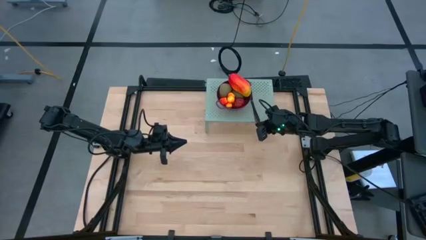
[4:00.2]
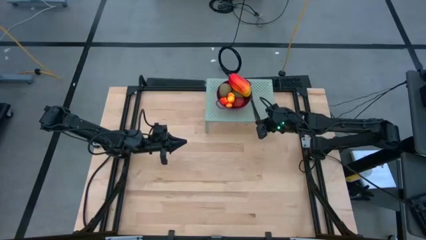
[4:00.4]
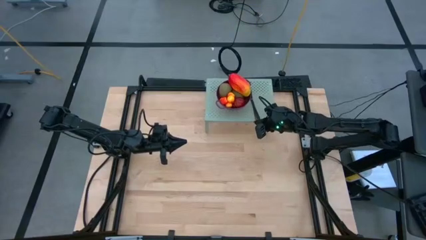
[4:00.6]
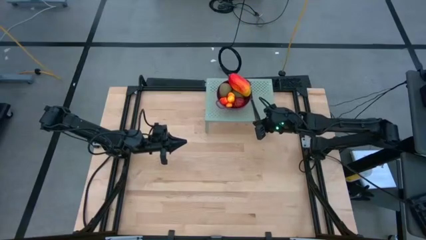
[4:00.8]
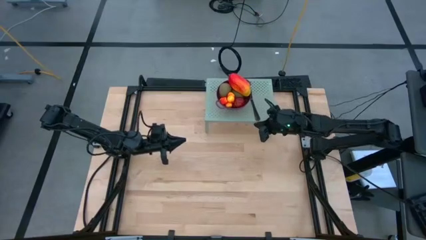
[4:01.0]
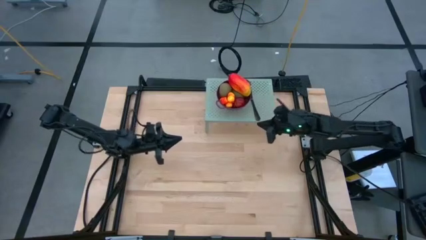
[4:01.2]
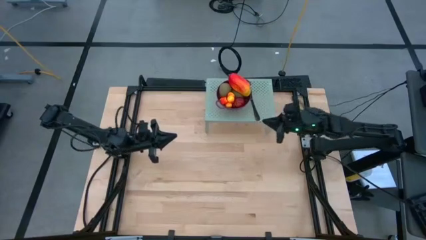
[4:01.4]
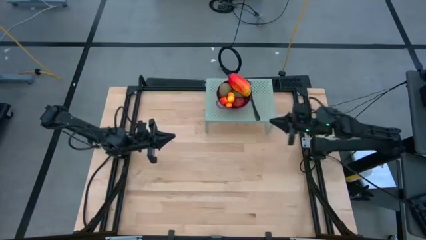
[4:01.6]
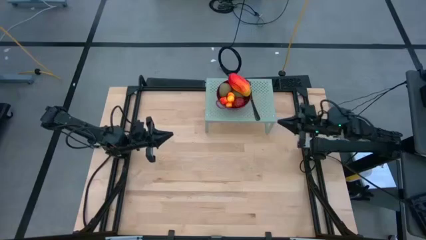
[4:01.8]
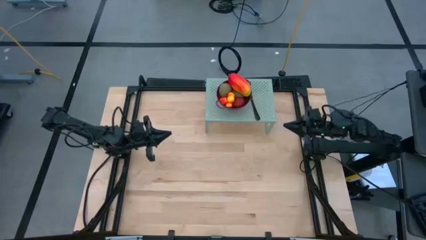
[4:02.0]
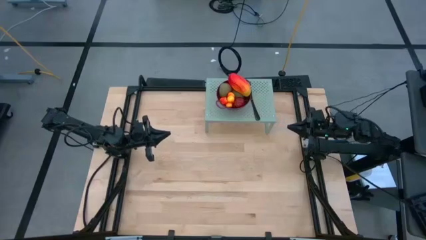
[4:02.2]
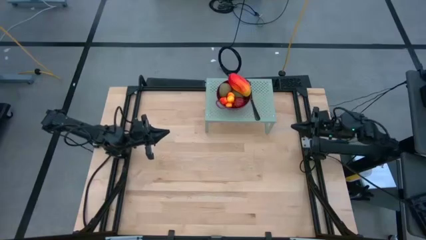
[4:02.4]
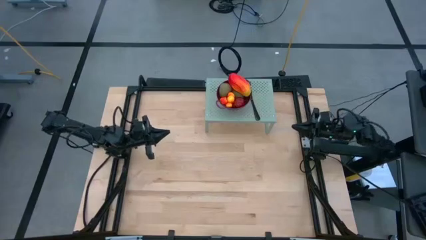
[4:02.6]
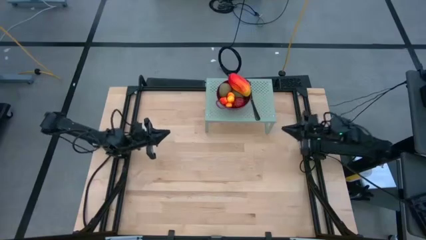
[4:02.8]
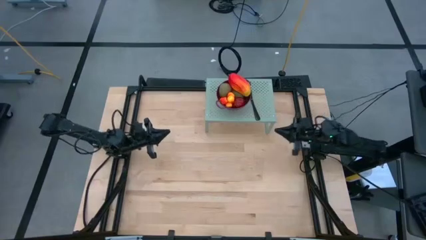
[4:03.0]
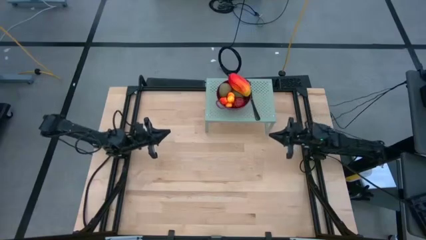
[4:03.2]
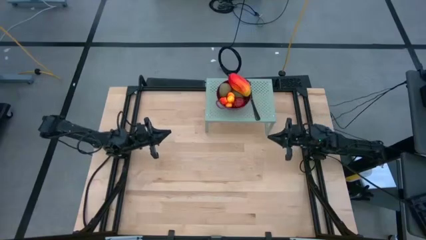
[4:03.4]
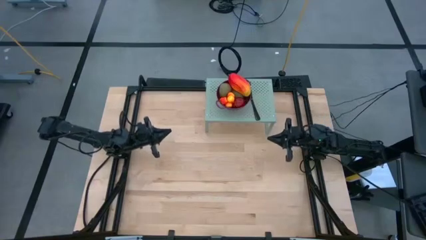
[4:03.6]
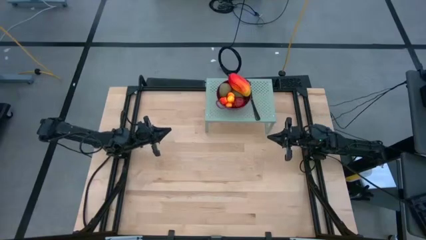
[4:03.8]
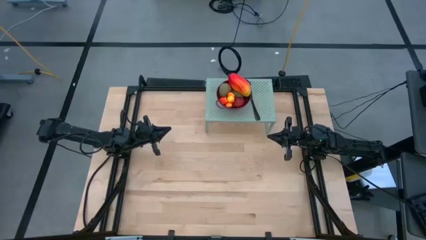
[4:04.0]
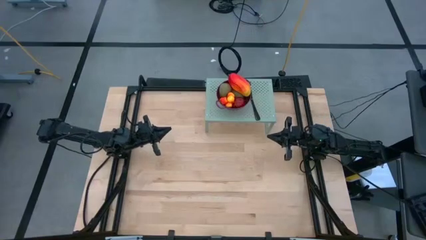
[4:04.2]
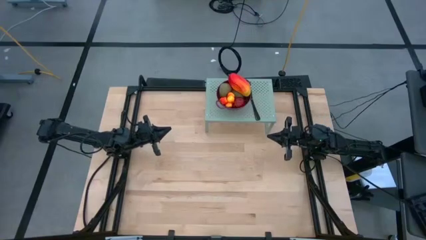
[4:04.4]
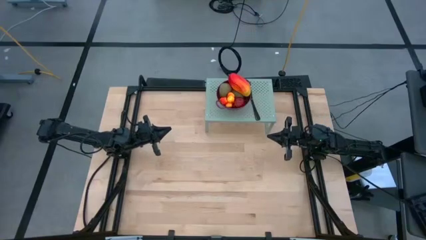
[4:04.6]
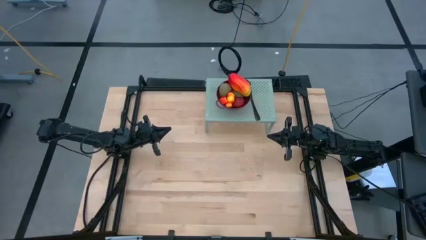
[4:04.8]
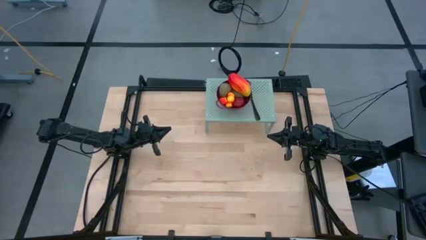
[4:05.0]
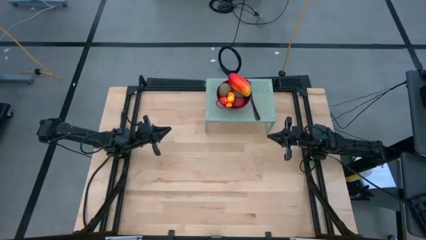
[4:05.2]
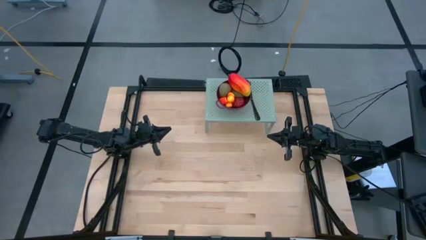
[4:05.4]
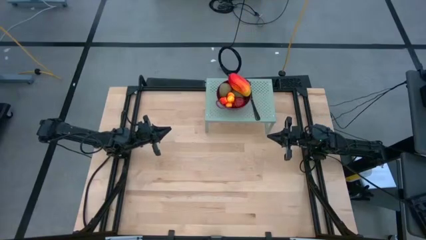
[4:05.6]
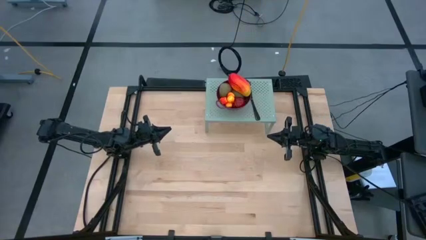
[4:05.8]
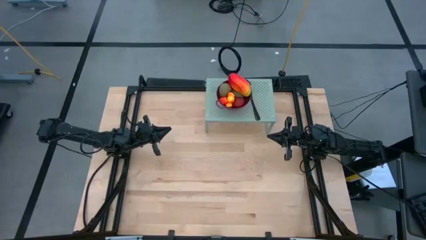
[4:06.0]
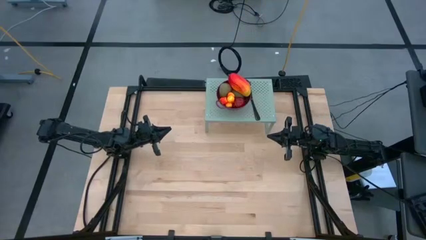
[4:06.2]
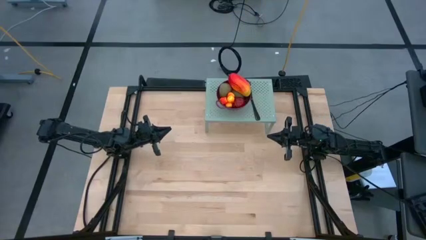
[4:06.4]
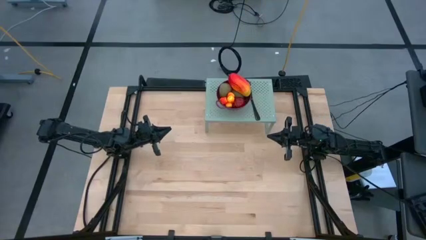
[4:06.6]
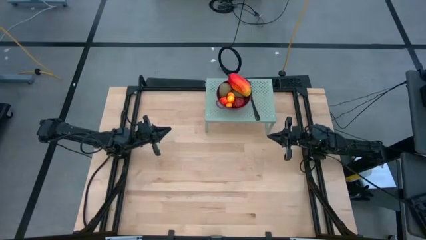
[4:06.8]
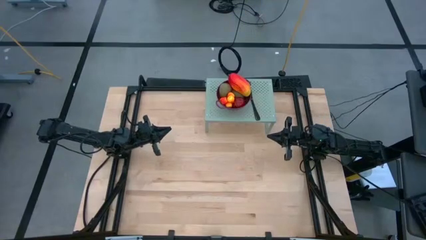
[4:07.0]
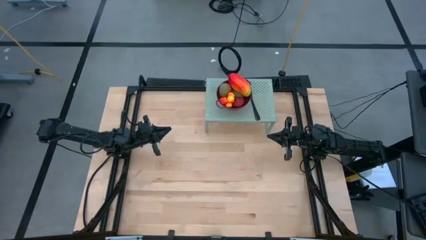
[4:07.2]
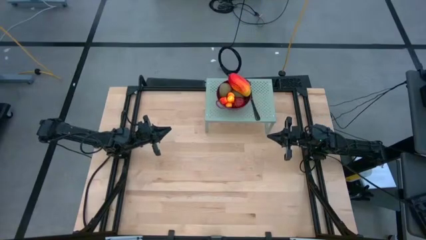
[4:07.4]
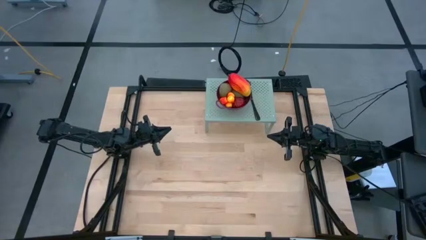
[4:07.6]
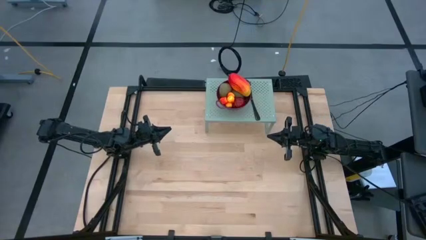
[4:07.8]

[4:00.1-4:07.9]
Task: Pick & Place Fruit
Return to Home Position

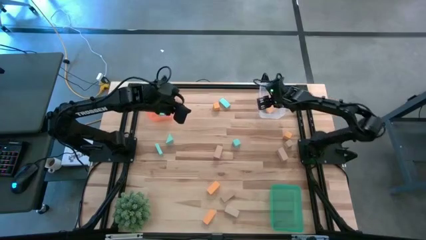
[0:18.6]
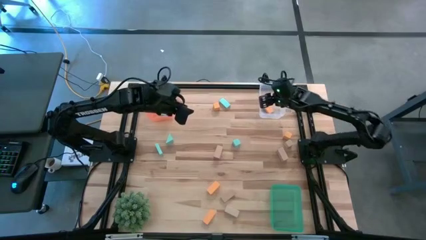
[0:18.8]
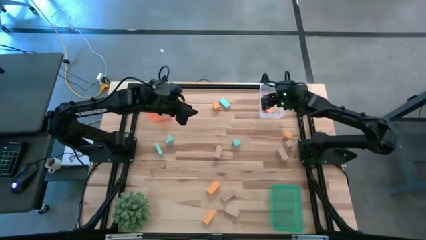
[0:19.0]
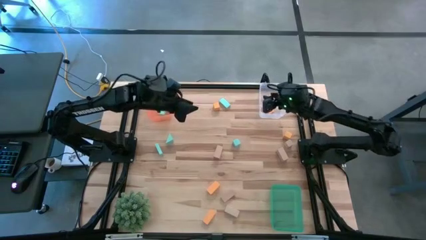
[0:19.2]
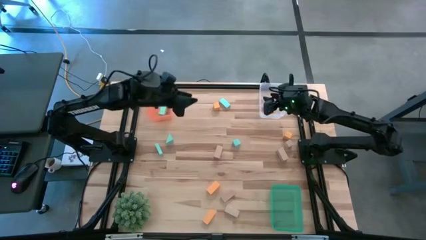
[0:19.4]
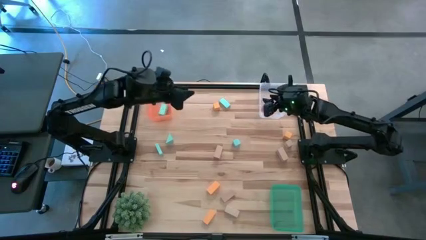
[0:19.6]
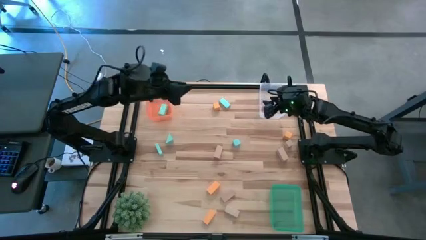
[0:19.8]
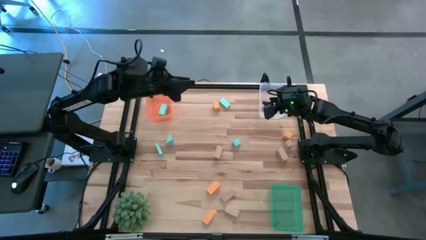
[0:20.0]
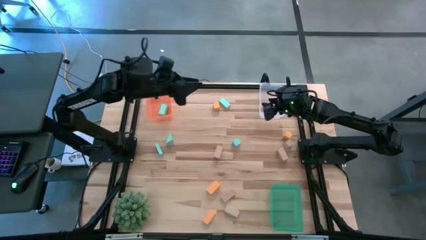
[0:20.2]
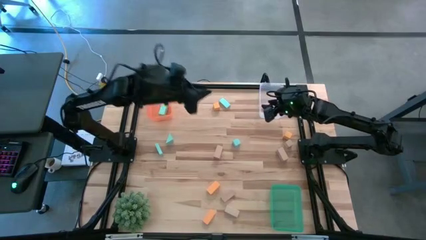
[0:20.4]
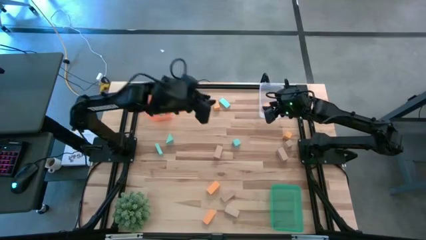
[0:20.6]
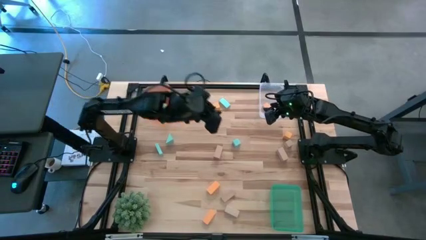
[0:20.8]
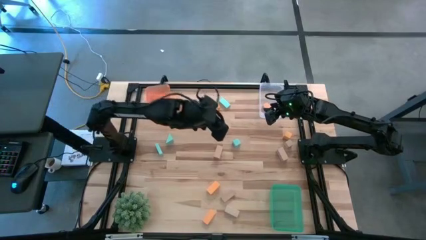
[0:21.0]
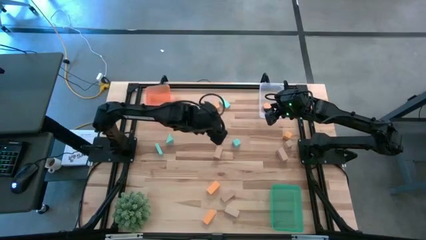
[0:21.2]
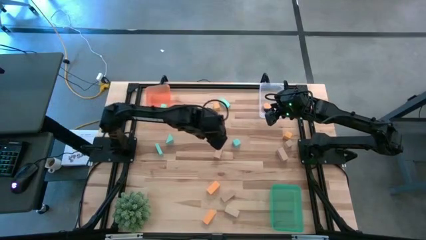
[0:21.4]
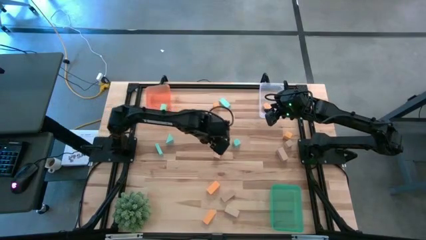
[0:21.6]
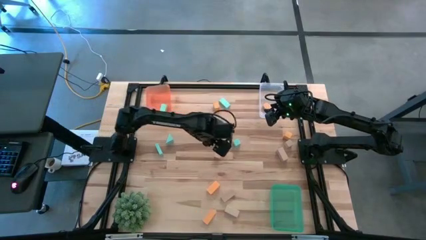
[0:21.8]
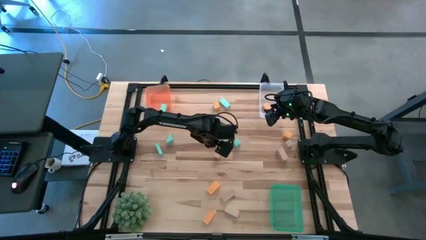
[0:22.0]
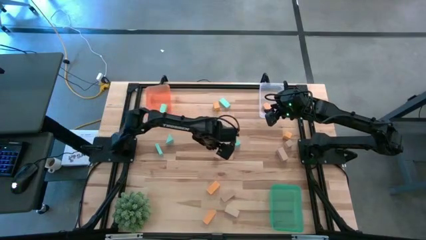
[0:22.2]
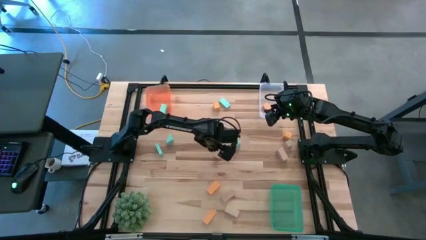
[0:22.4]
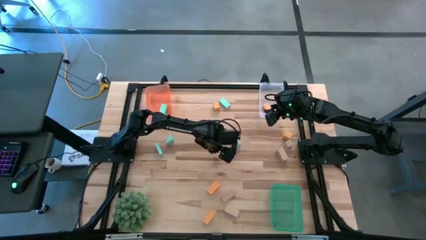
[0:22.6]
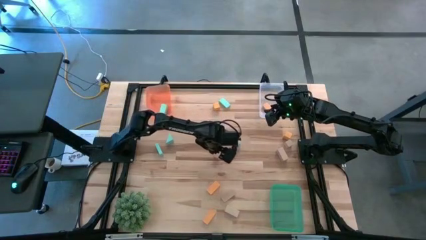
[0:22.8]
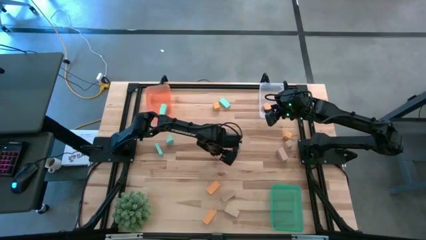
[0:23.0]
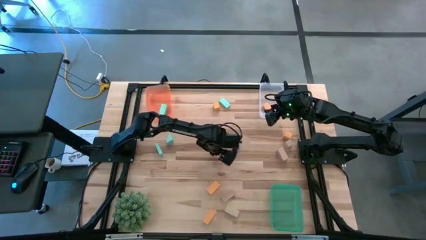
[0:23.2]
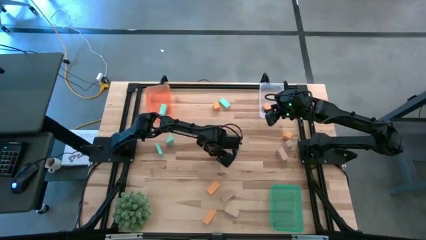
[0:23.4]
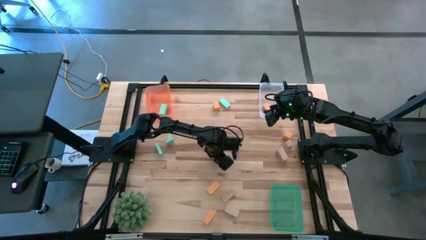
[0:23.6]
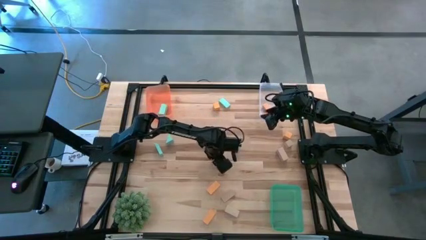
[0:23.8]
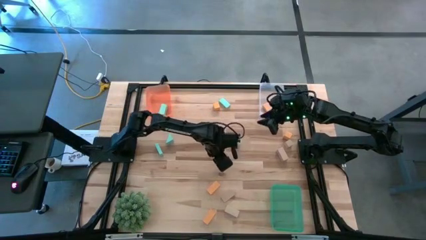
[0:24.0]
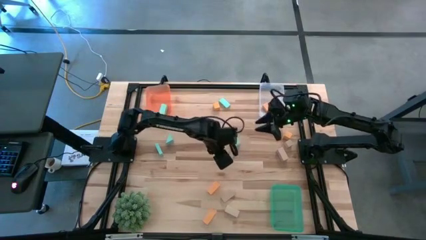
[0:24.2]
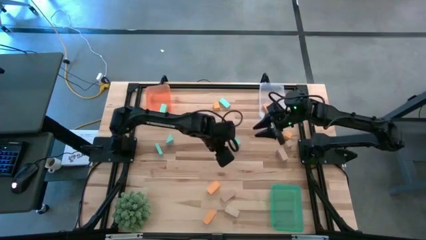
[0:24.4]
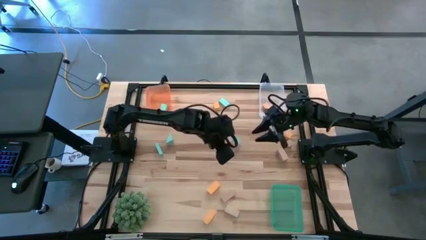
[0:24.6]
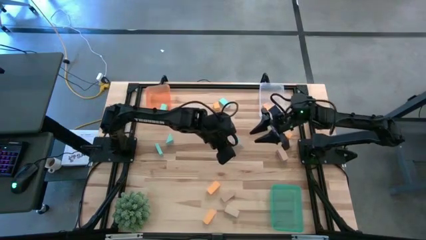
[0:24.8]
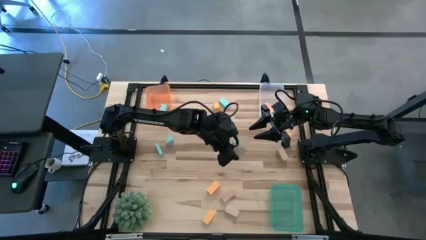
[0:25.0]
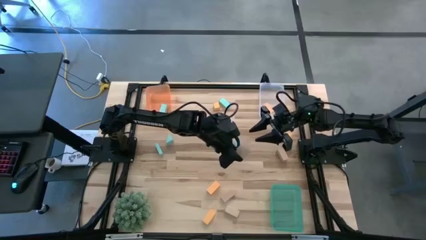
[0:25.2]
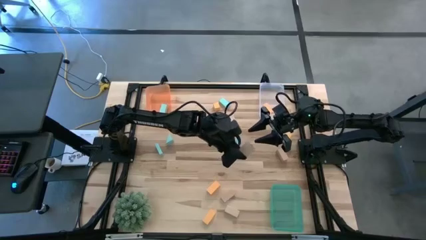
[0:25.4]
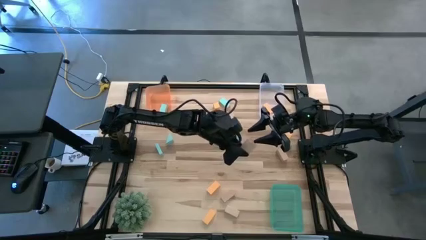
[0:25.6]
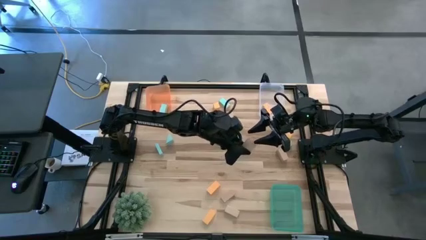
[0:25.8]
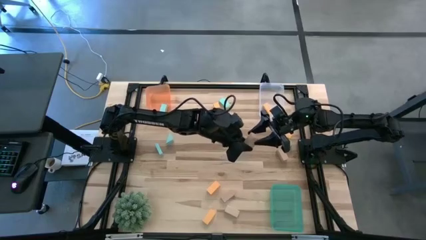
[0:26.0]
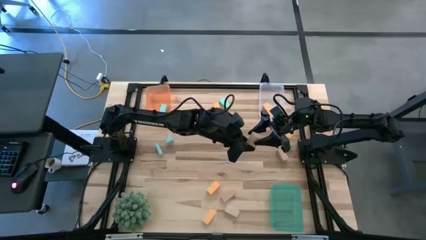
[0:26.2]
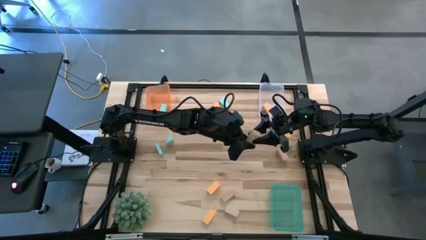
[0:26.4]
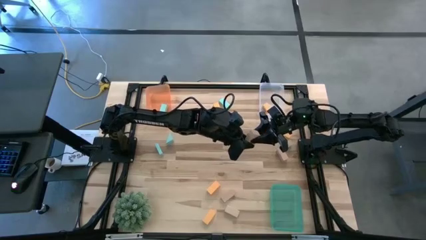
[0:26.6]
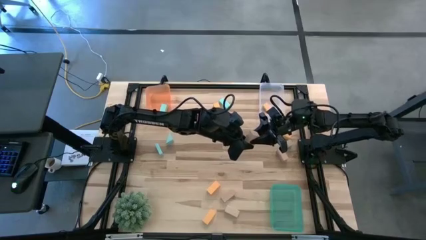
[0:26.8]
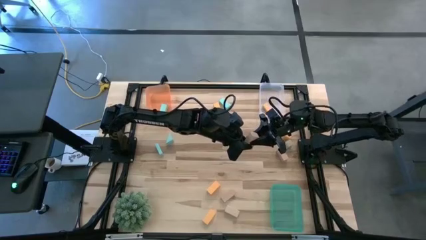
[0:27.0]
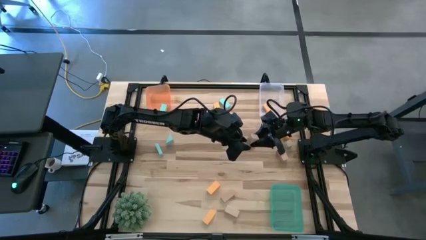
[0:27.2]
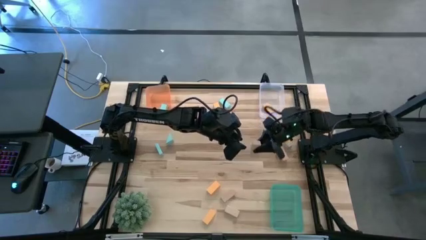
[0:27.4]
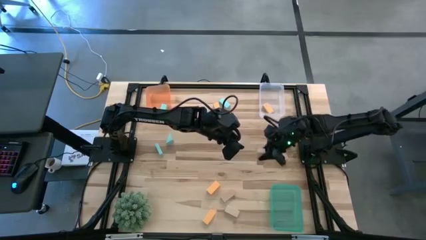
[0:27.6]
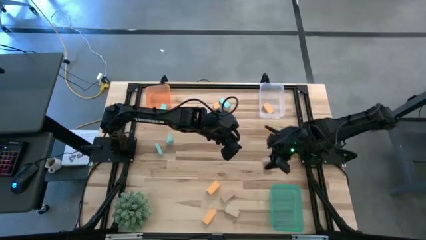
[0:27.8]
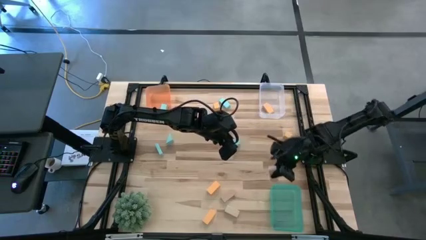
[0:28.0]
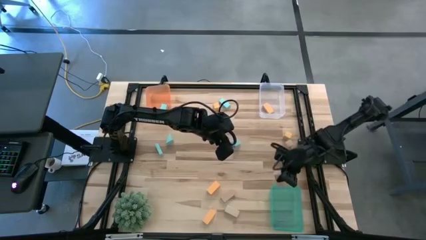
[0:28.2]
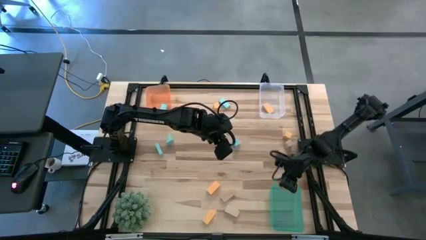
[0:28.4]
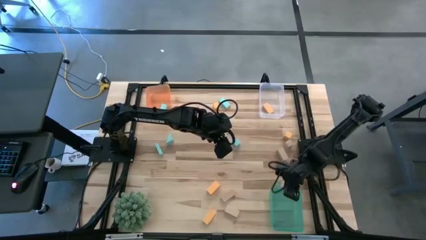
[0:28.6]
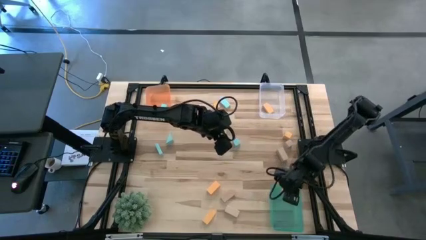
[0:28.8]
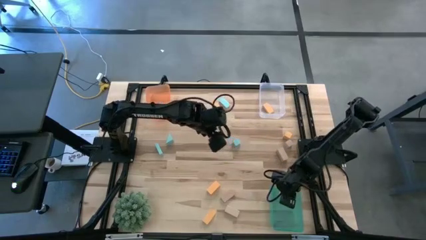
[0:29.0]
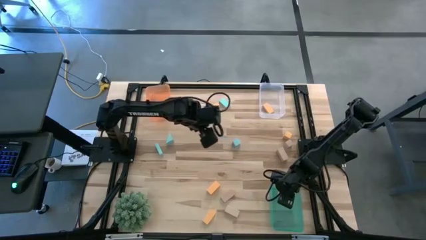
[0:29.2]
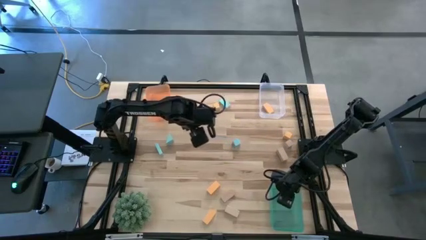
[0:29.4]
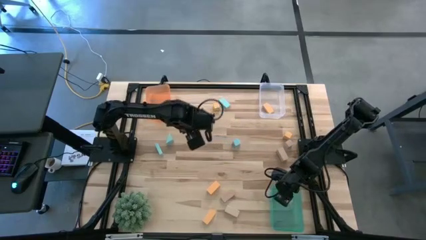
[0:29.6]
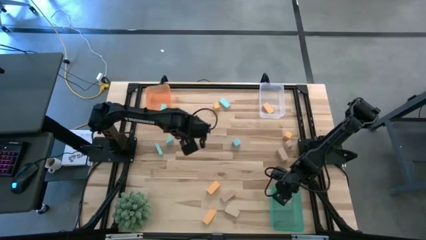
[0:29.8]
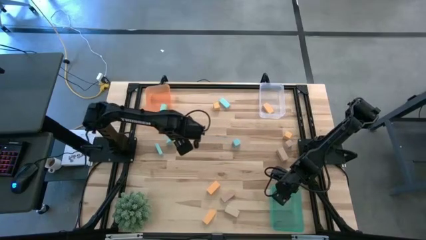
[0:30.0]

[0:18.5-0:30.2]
Task: Sort & place blocks by color
Put the brown block into the light green bin
